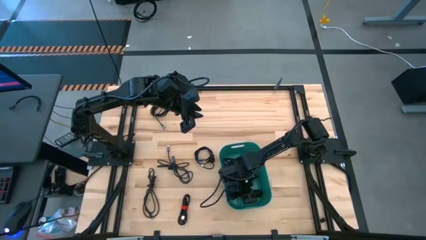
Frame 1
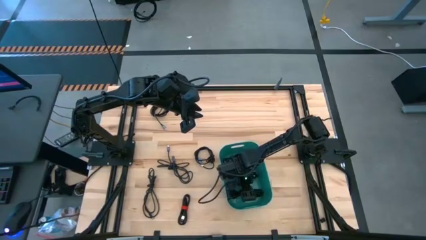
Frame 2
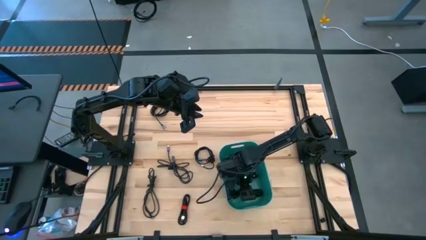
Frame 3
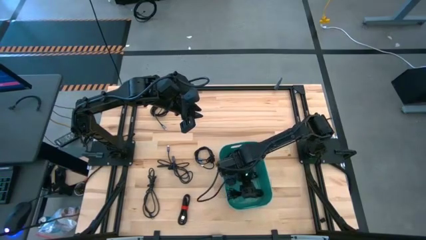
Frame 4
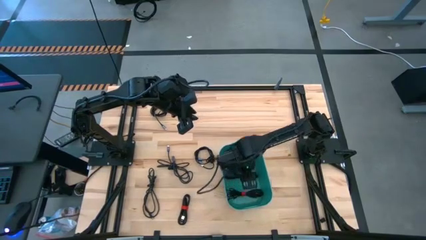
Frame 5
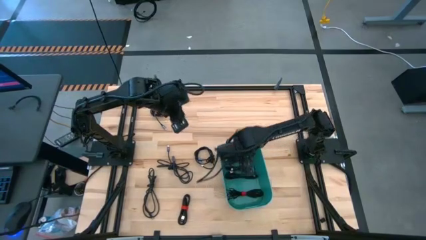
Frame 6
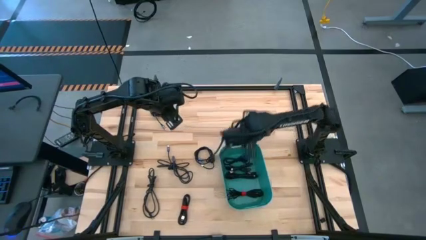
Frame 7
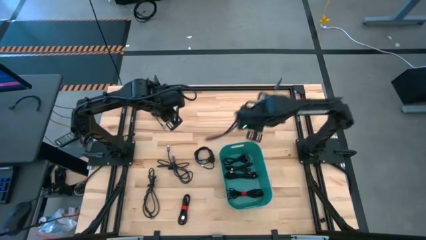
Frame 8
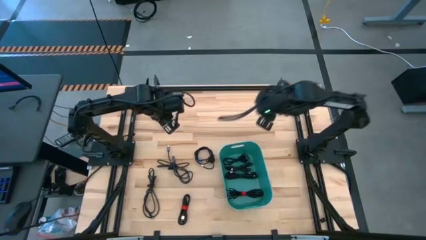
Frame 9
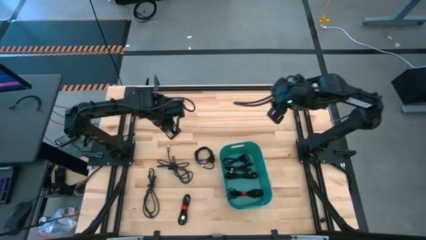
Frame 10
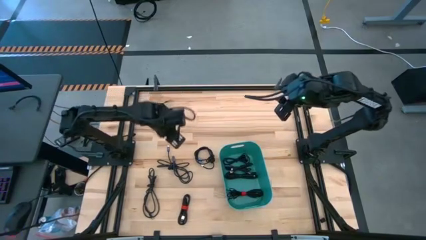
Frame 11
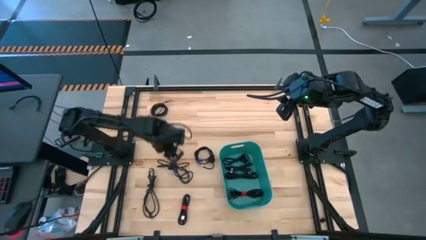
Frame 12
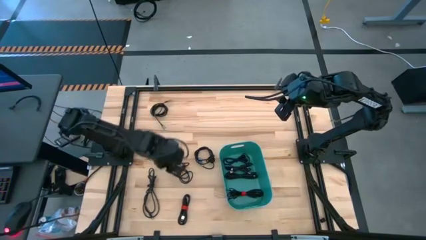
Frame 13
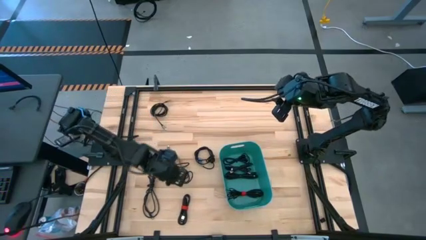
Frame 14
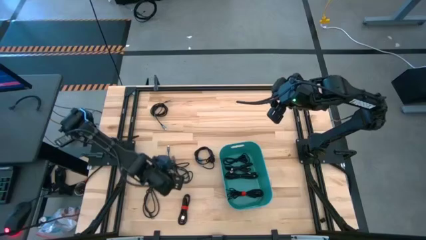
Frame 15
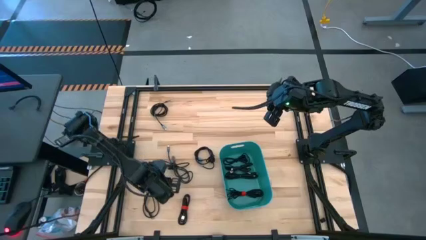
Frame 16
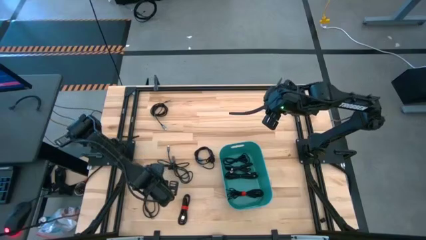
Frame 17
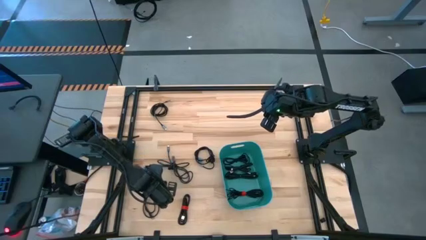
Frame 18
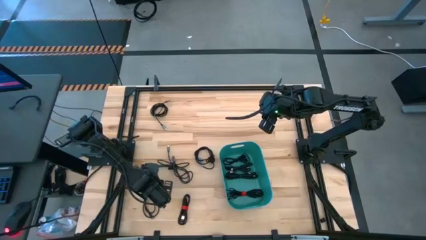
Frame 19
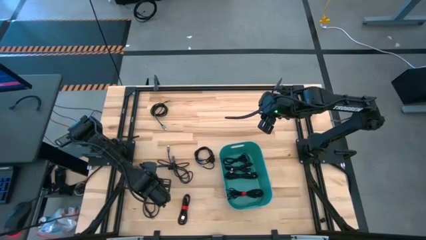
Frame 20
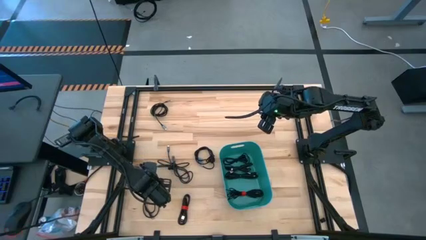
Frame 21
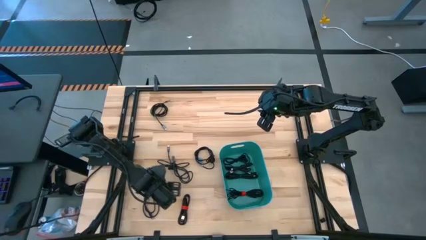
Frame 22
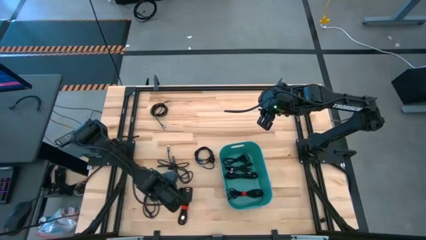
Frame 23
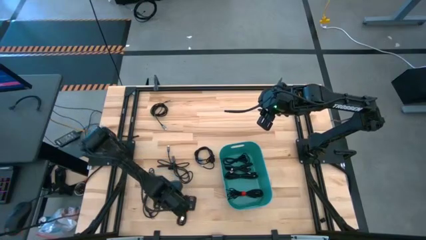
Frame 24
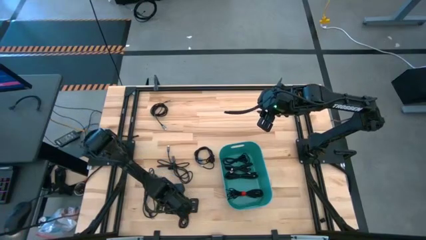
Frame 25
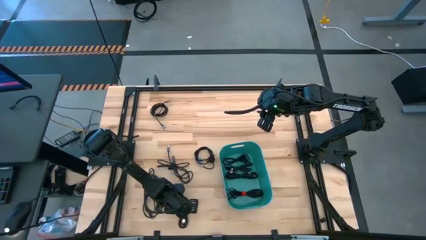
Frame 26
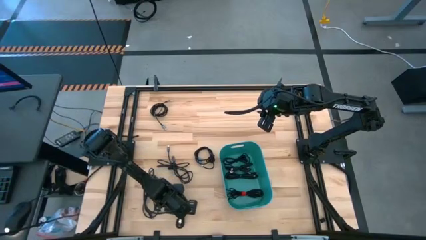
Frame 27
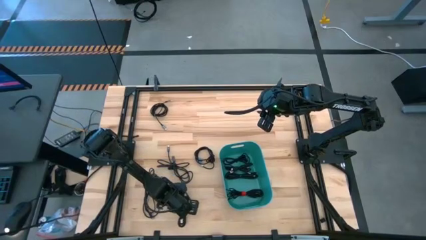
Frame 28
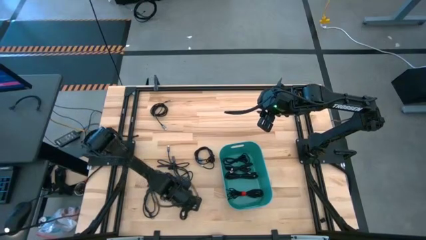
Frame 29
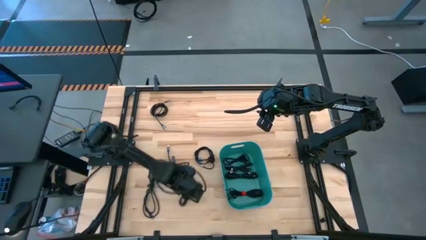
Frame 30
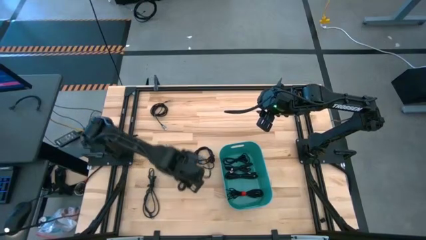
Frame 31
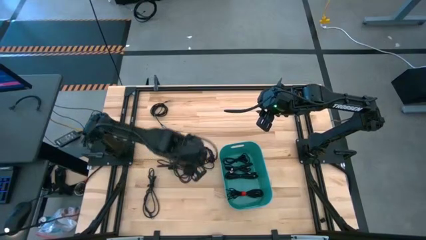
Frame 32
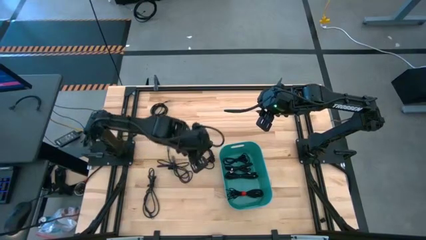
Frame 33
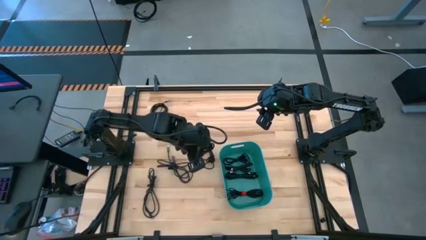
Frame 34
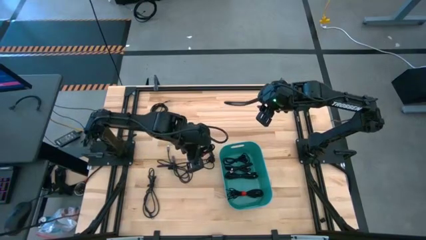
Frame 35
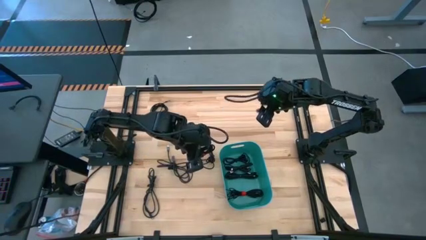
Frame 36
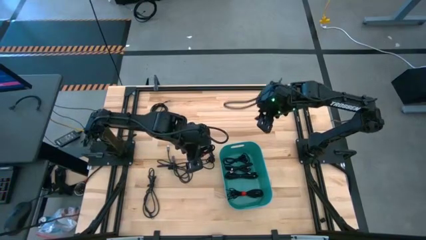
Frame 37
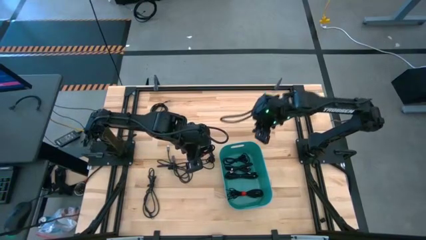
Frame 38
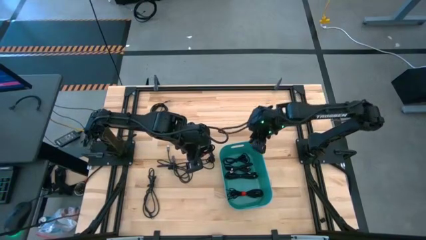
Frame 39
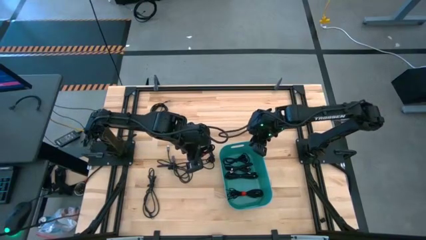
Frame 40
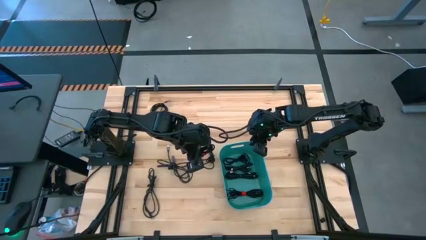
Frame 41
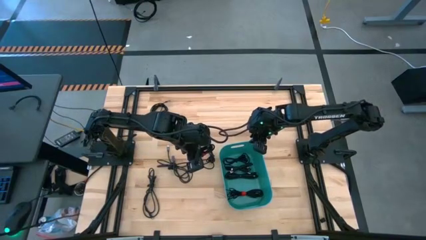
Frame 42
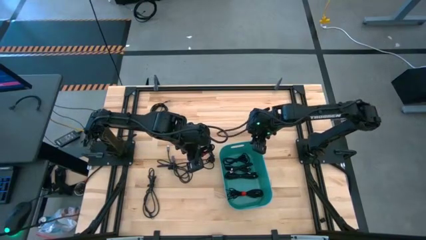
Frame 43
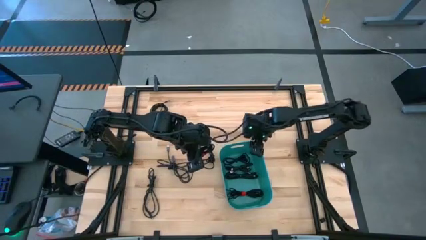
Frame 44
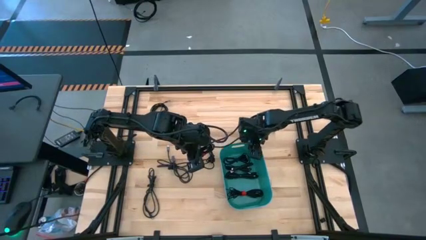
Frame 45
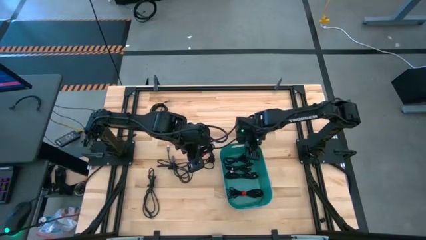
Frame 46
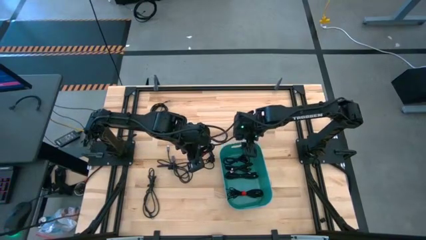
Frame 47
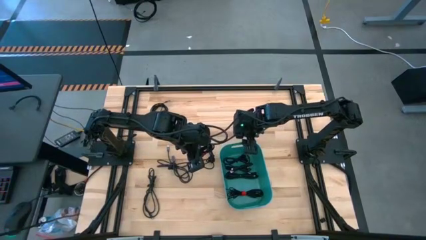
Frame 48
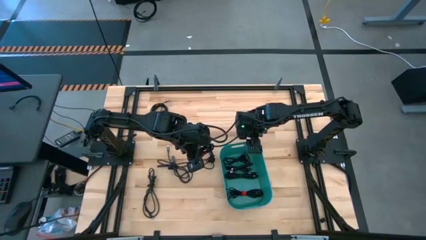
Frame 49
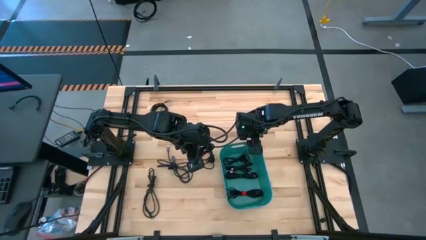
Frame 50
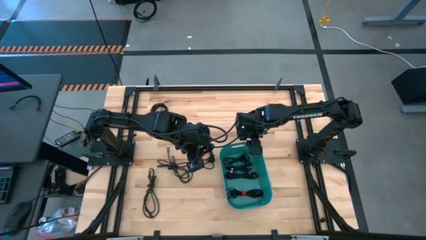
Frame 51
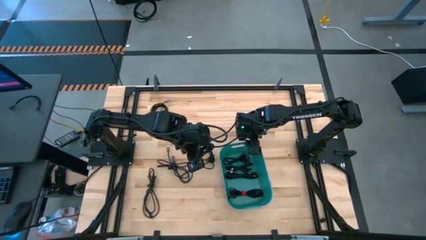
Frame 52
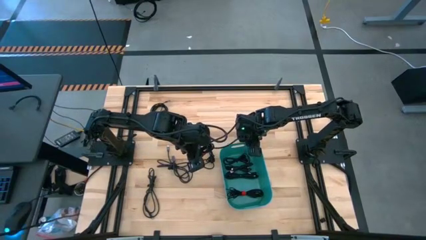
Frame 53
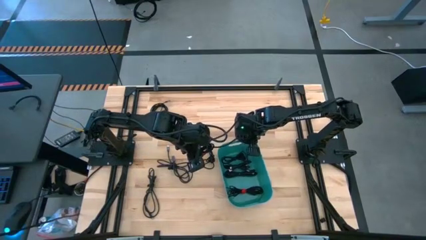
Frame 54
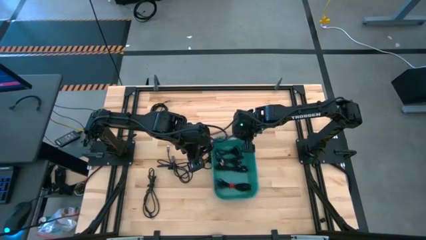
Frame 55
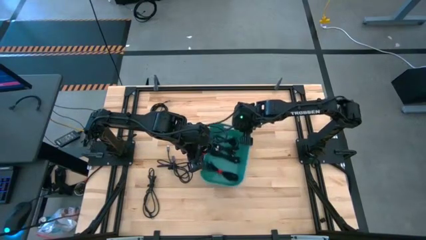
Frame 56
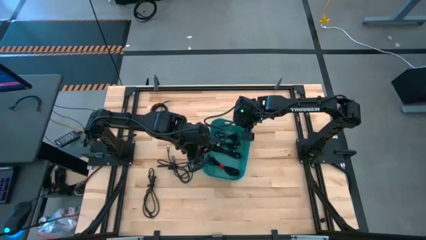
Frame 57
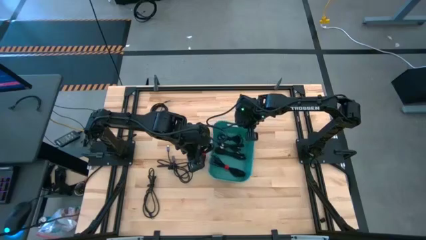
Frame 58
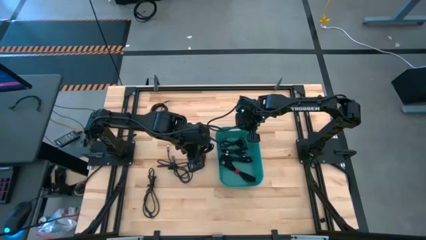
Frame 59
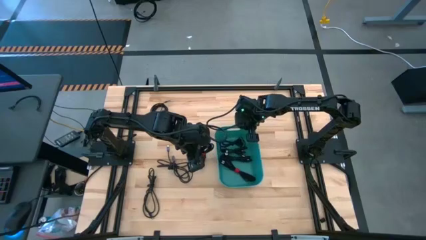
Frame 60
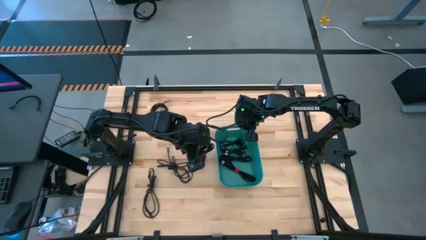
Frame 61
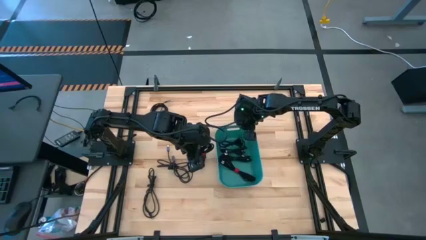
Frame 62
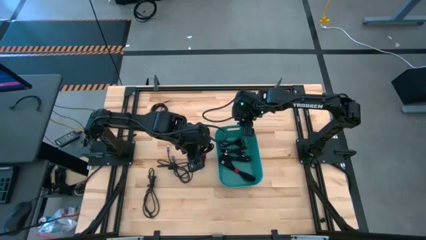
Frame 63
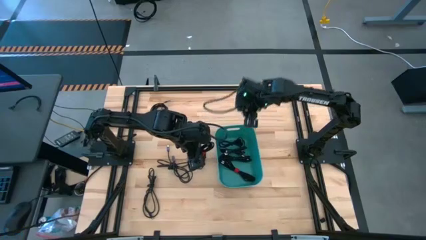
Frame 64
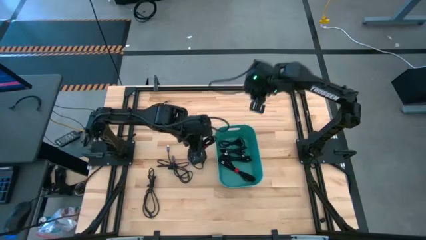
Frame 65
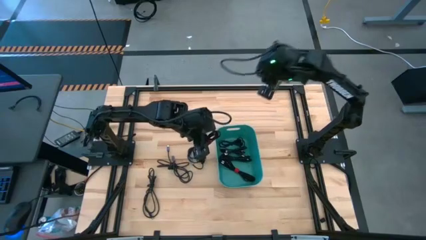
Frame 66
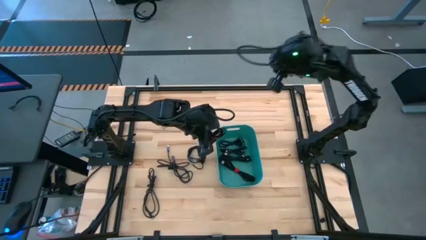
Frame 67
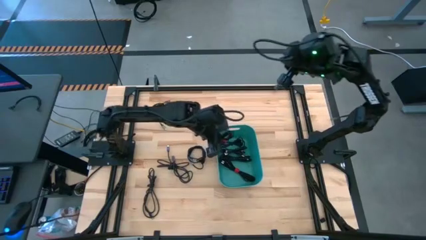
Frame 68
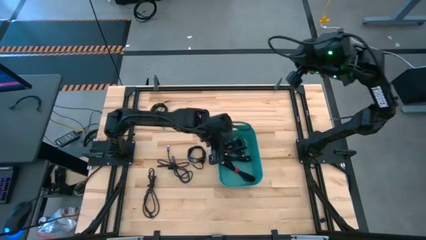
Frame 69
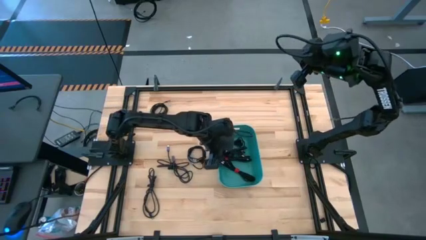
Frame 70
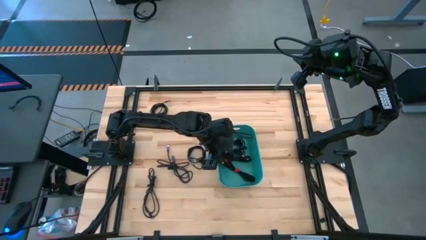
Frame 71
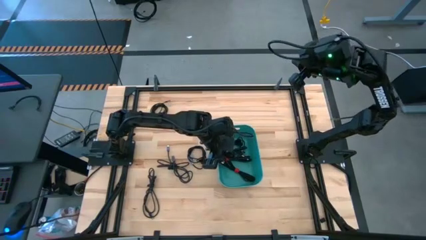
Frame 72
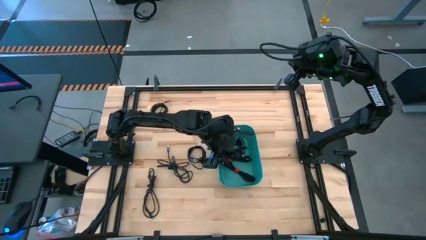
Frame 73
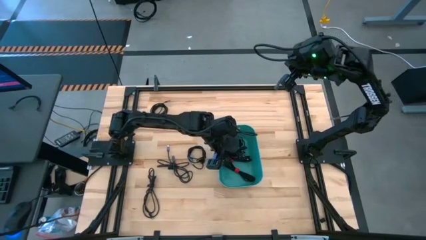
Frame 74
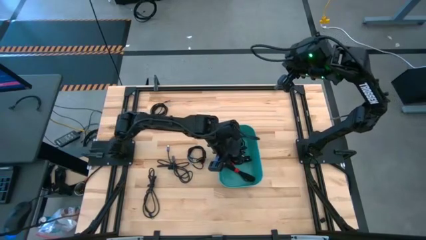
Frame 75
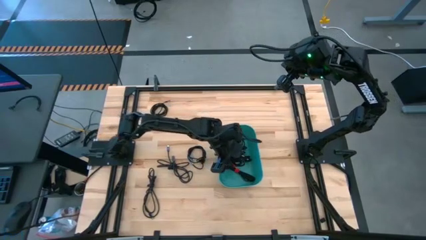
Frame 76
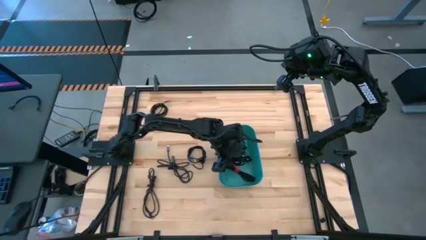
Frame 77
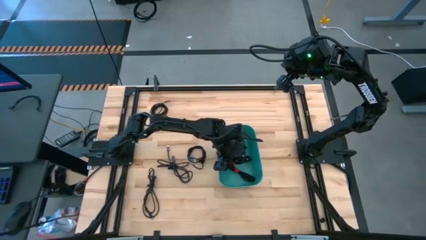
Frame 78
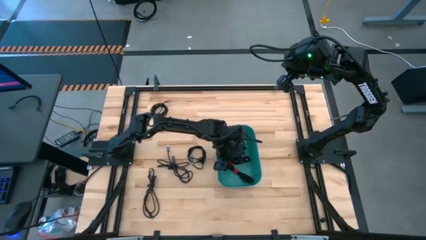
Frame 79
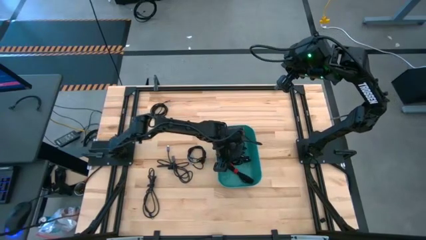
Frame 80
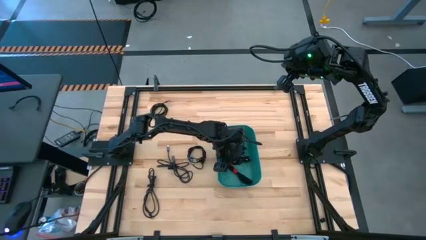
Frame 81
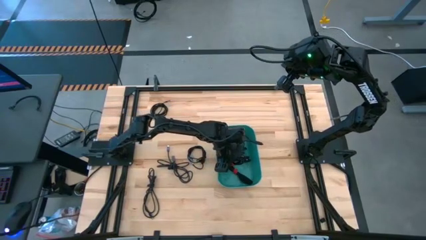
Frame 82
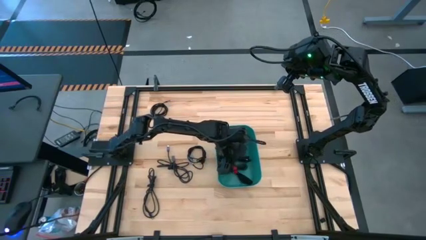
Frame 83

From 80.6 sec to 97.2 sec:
Task: Pick and place USB-C Cables
Put the black charger cable into the green bin
